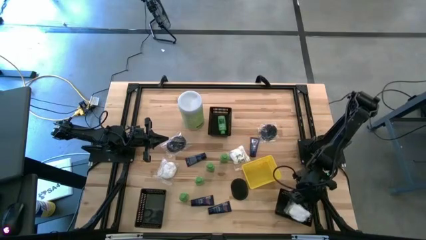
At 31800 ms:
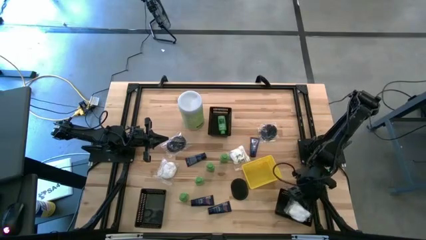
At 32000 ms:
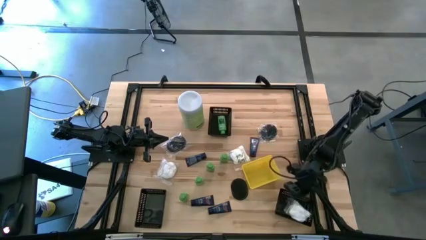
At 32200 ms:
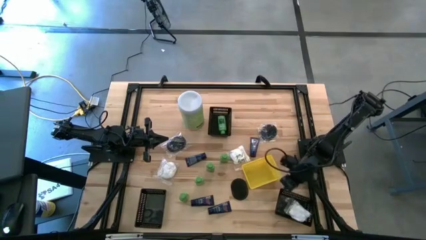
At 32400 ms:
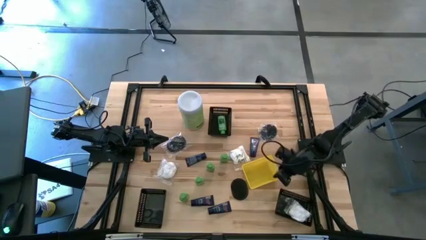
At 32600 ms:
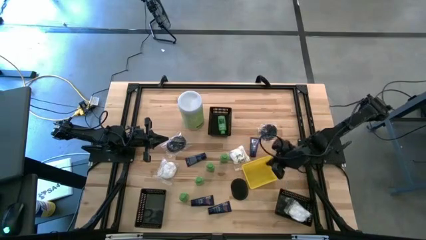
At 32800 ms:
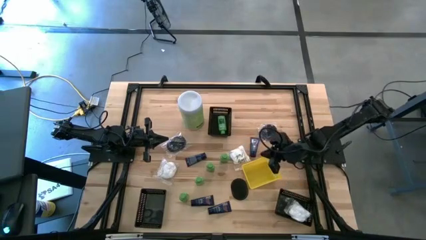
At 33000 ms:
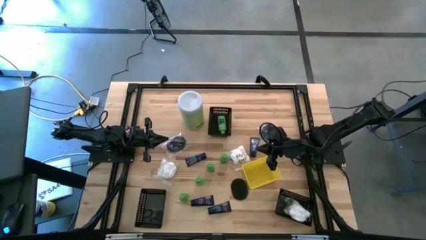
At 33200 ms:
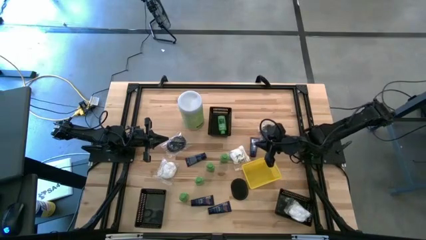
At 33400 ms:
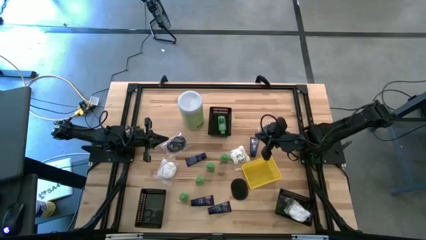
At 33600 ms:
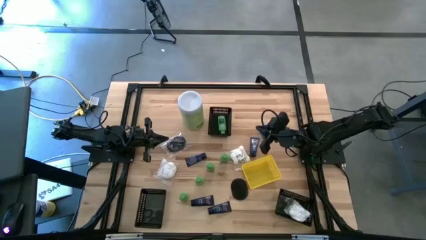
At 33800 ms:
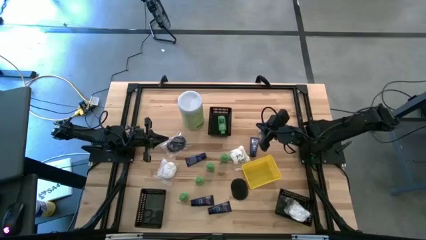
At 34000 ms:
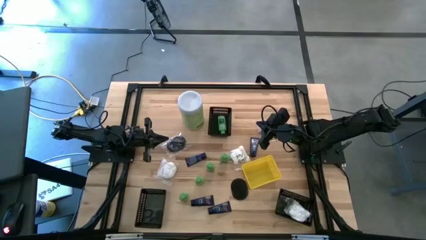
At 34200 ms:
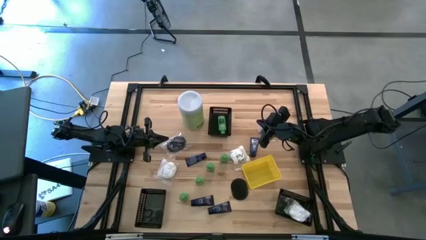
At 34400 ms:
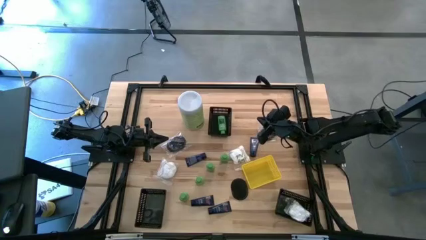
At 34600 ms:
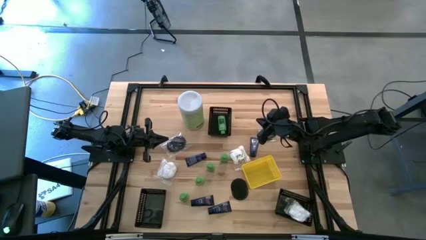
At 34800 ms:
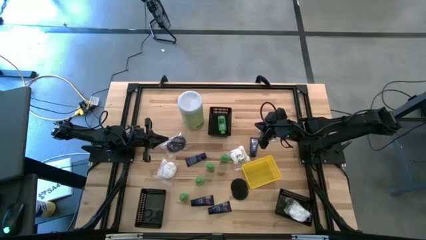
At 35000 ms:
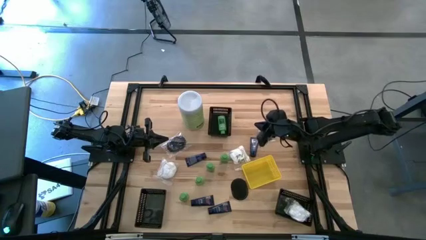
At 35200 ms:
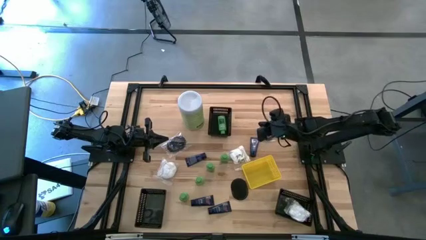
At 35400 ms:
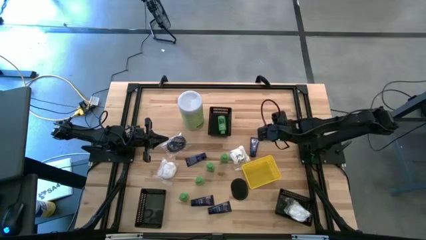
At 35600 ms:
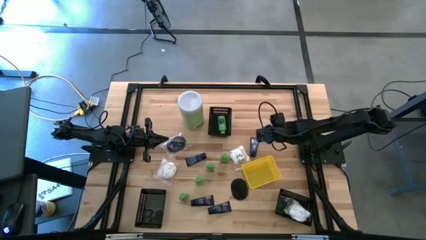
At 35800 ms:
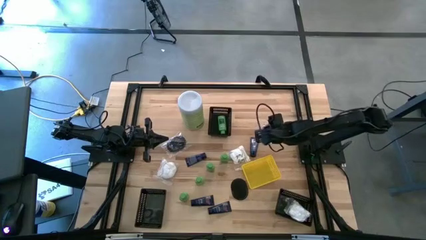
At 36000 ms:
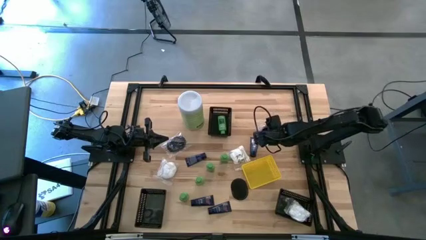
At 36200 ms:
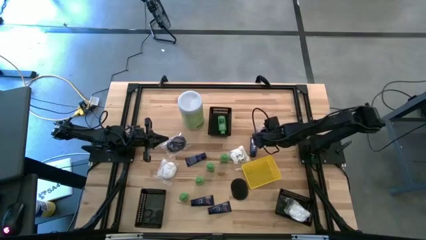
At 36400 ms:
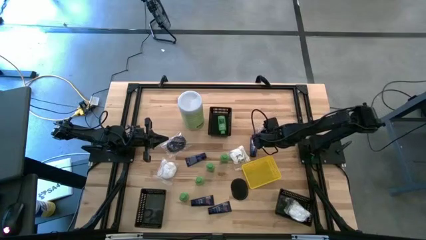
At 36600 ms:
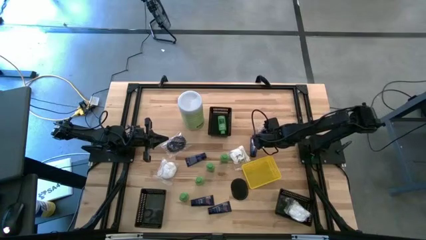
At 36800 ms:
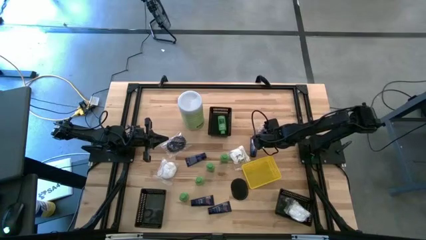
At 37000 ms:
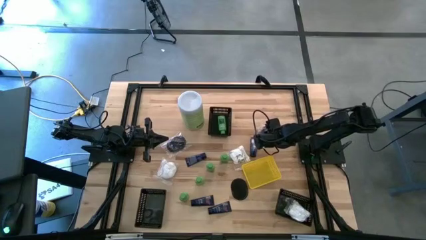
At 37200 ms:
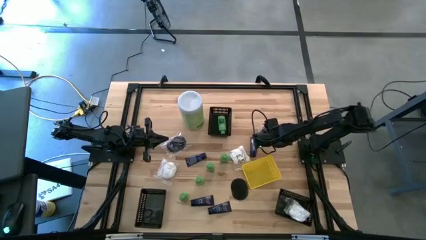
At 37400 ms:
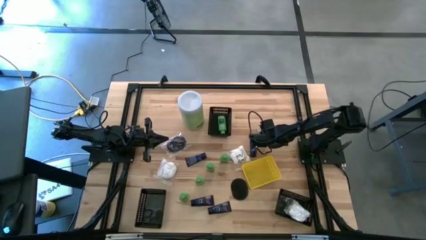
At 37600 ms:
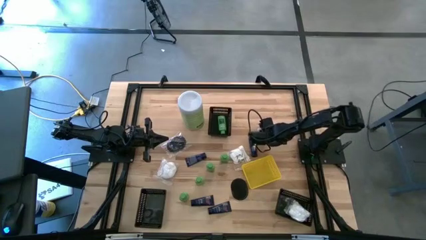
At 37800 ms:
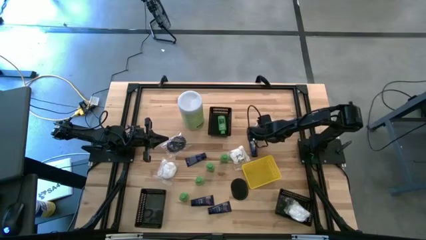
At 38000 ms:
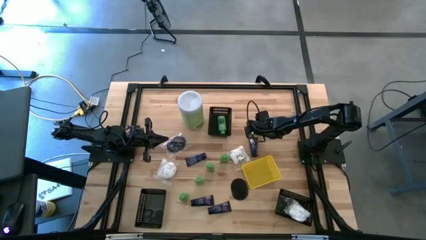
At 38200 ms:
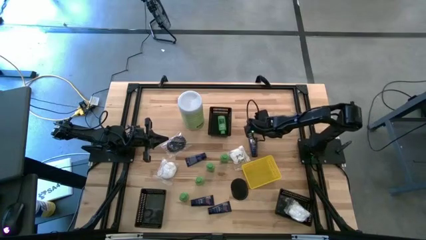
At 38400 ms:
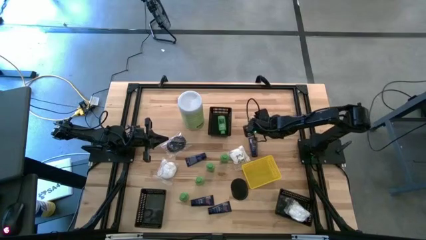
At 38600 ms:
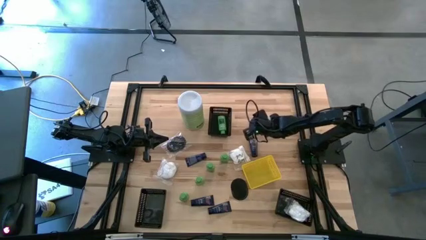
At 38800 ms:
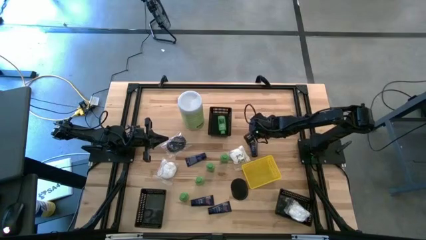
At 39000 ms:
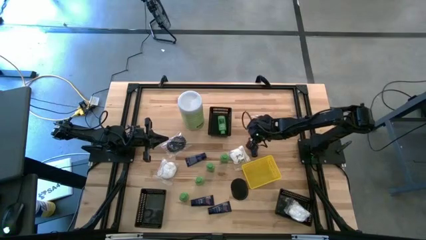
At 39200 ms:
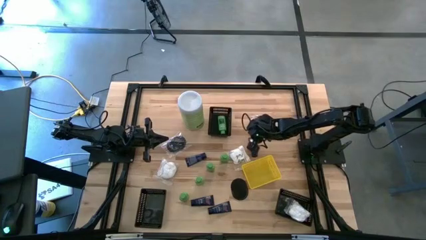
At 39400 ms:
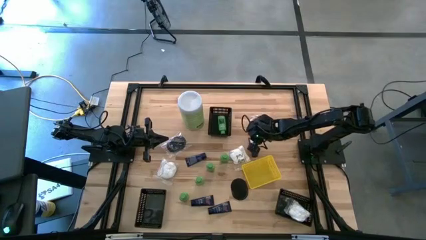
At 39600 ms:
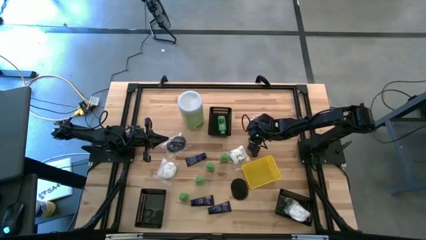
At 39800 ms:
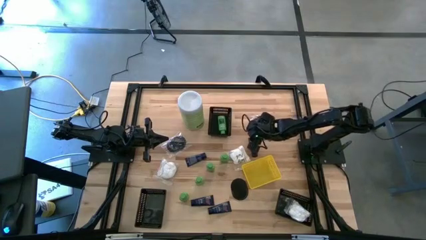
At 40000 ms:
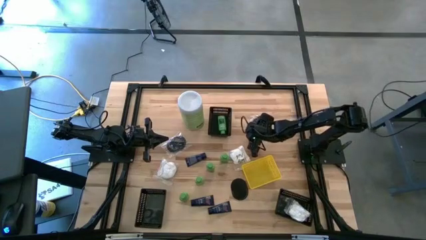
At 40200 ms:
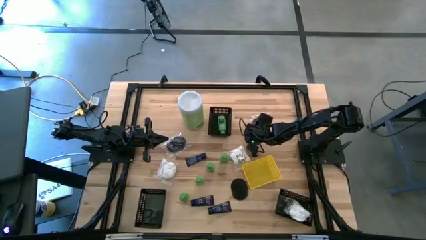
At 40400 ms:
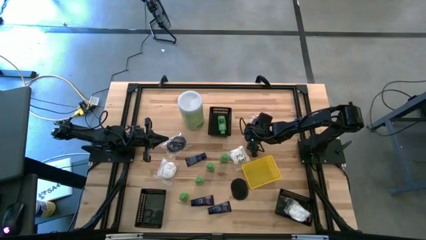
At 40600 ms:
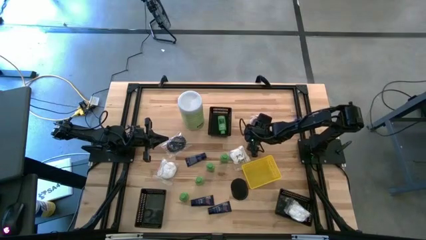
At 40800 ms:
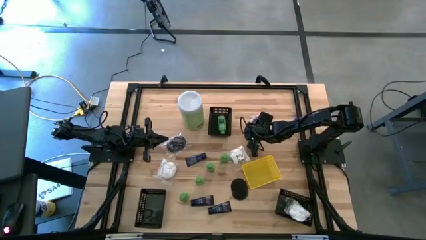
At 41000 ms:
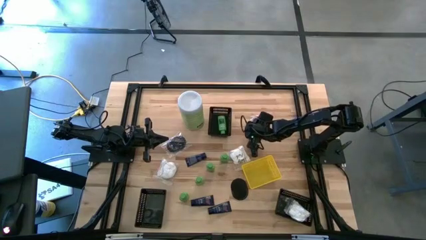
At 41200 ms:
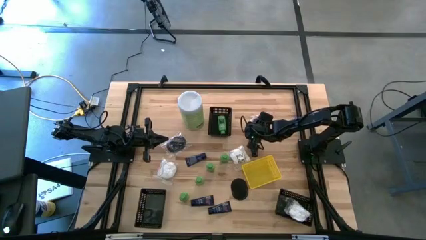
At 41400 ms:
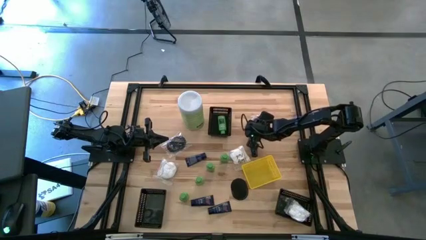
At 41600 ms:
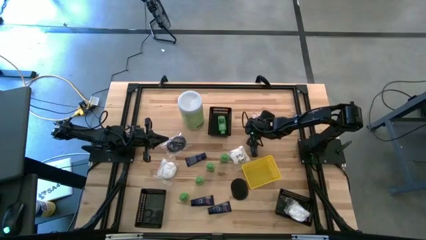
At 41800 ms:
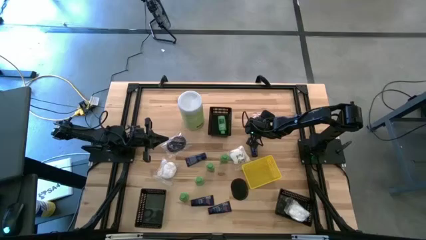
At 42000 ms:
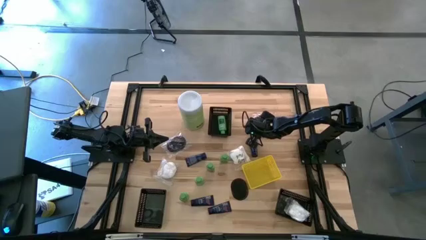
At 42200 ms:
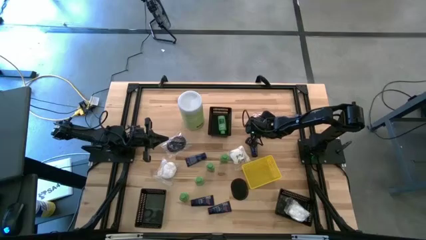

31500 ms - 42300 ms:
Task: Pick & Place Travel size toiletries
Put the black hair brush into the bottom left black bin

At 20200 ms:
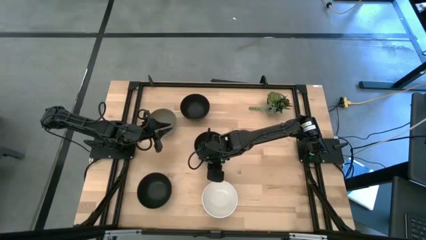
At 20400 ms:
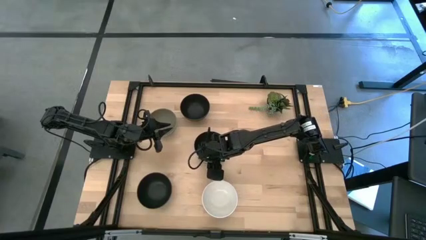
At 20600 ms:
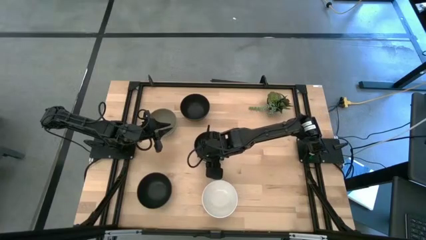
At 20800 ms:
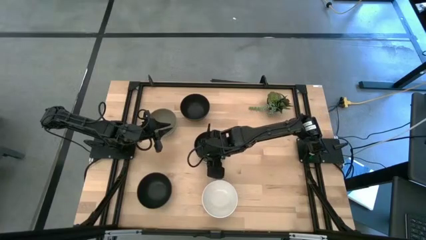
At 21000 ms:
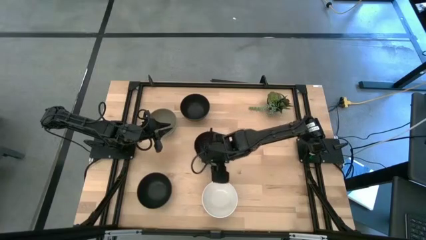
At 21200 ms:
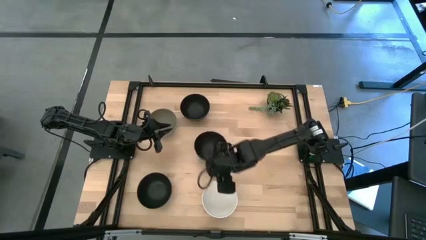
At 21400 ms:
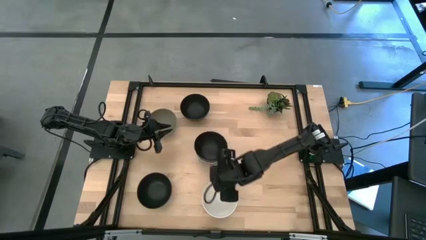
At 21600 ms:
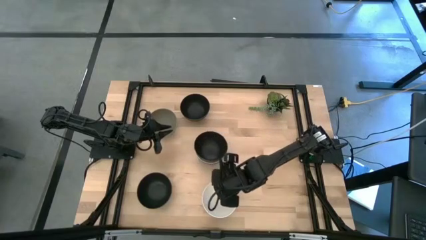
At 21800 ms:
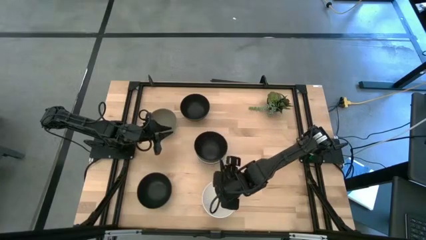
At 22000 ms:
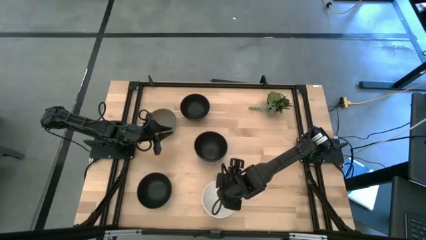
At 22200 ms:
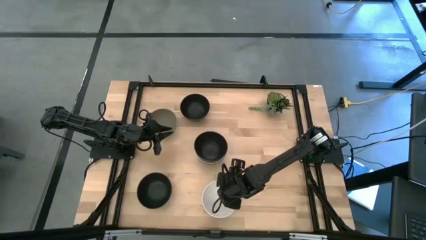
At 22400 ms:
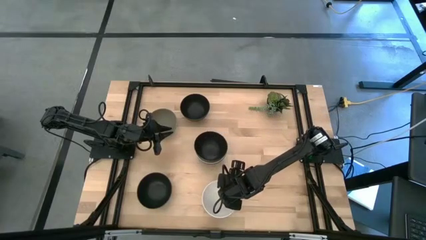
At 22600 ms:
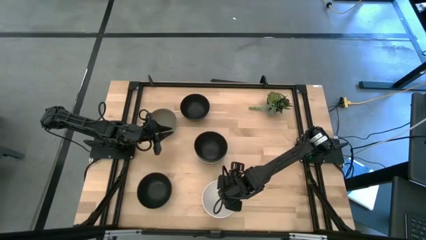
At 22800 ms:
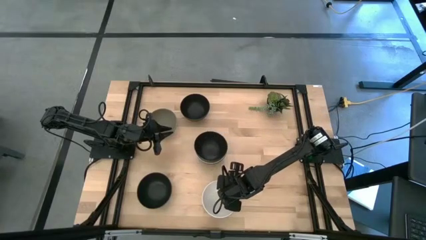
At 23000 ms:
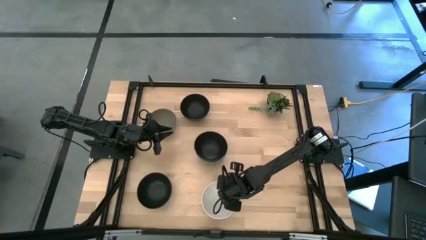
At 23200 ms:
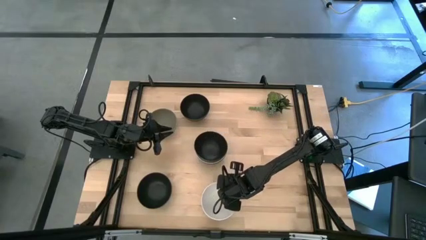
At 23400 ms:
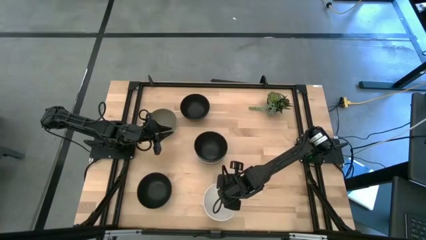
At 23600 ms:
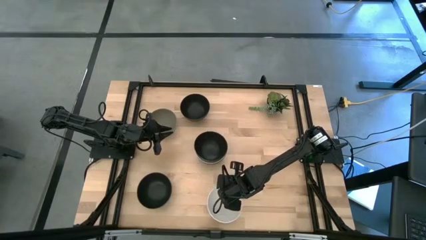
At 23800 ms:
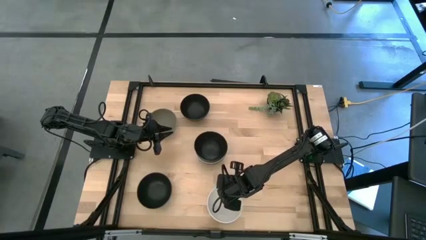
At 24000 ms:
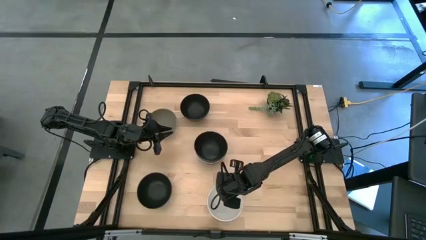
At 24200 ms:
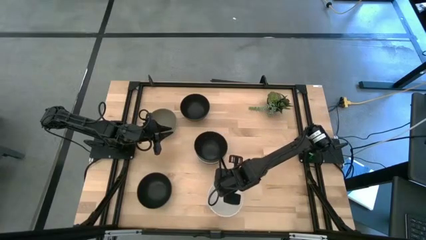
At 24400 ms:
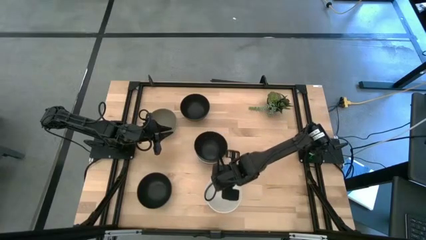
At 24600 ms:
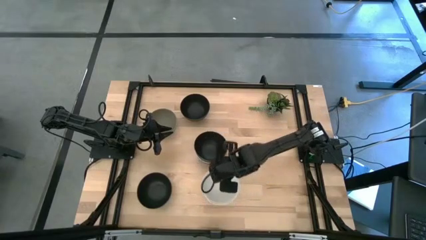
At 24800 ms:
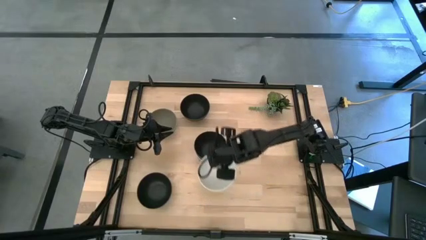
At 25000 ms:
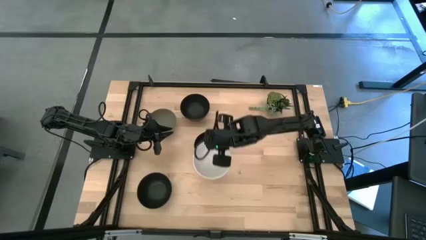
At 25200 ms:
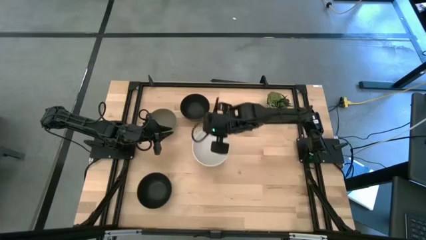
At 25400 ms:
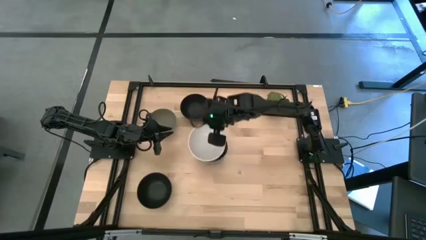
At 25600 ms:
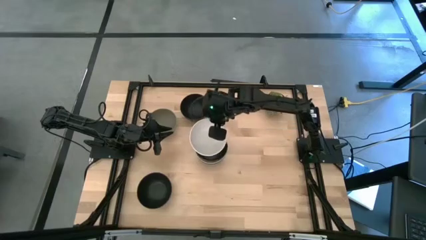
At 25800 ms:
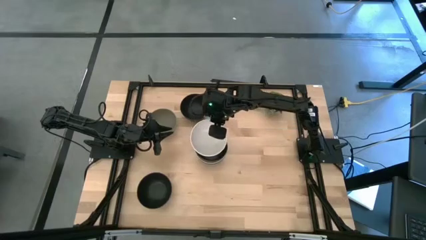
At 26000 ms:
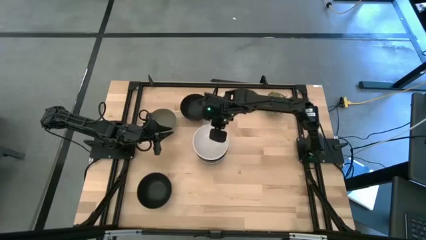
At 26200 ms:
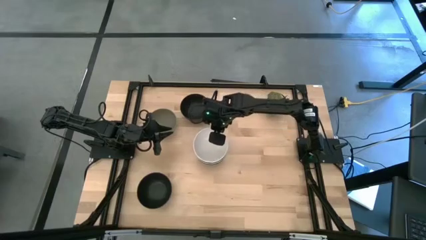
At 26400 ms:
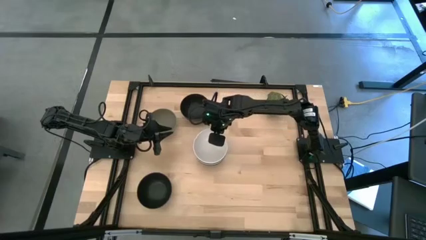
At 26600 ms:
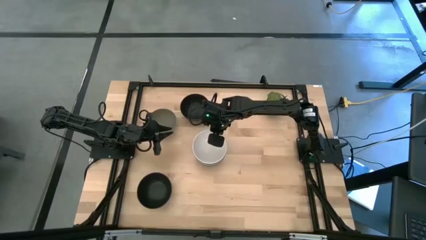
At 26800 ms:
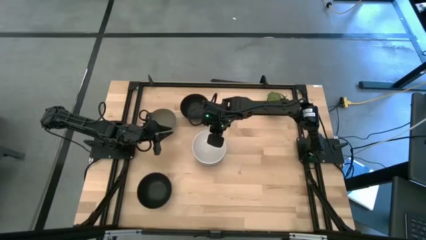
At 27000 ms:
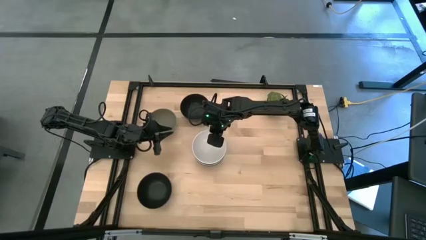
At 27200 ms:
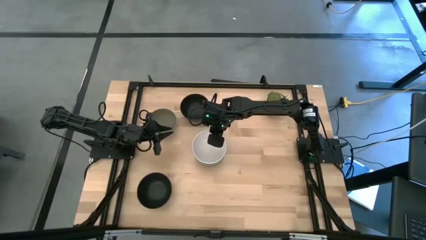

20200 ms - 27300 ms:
Task: Nest bowls inside each other
Stack the white bowl on top of the black bowl
